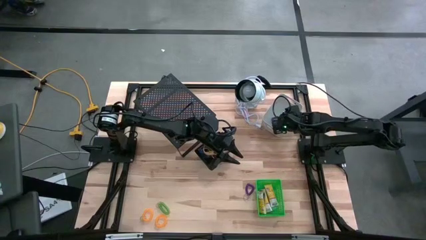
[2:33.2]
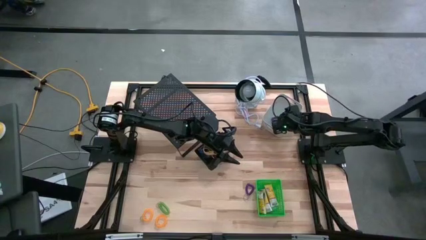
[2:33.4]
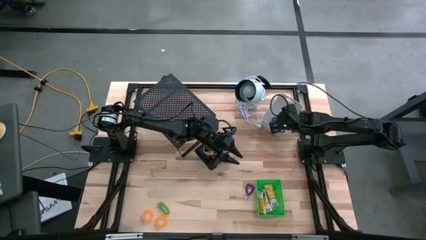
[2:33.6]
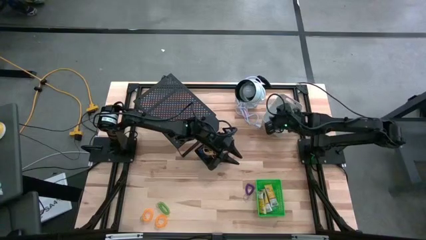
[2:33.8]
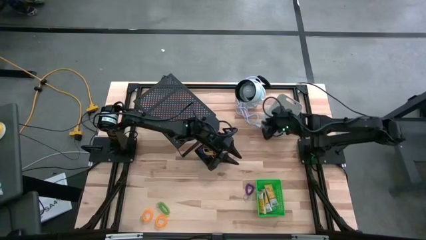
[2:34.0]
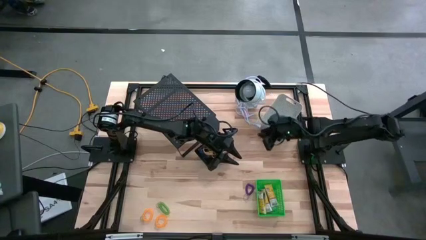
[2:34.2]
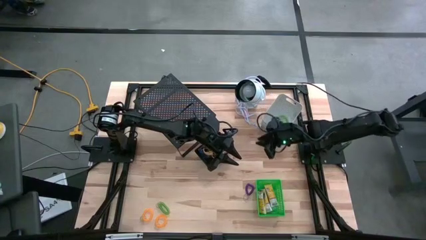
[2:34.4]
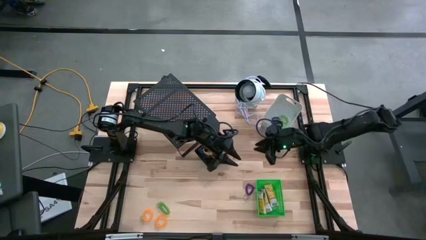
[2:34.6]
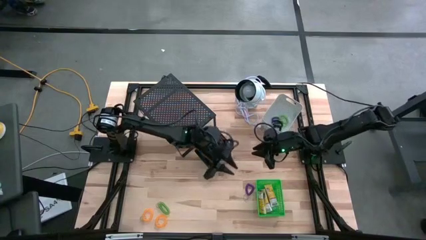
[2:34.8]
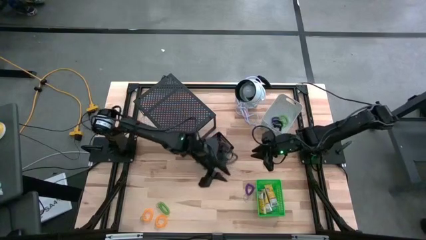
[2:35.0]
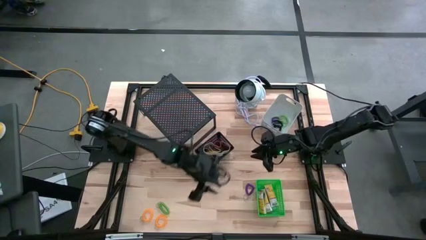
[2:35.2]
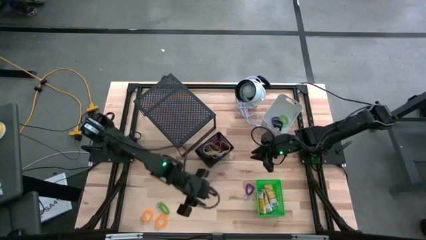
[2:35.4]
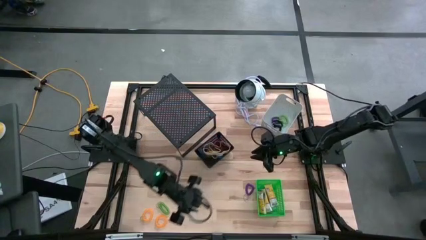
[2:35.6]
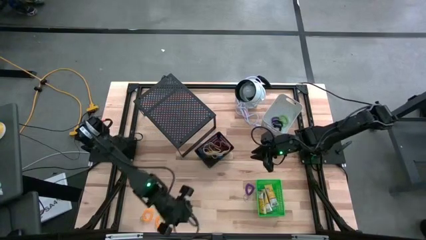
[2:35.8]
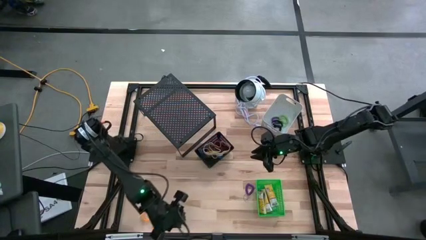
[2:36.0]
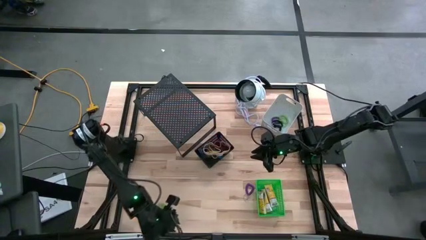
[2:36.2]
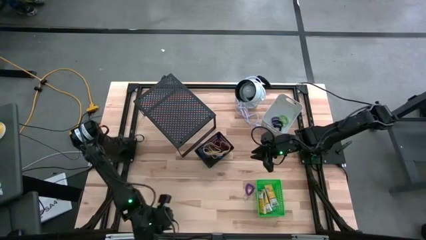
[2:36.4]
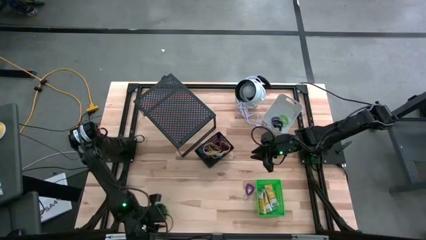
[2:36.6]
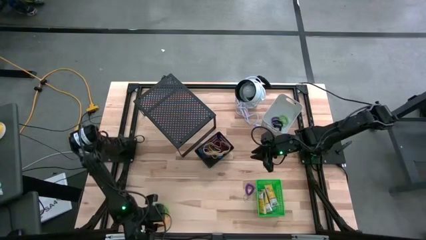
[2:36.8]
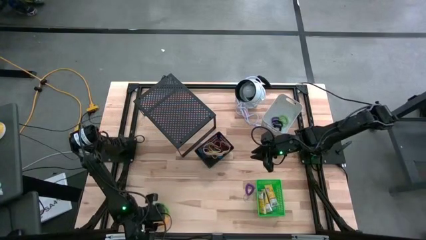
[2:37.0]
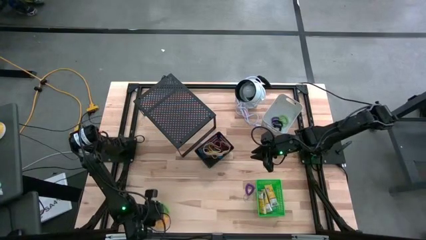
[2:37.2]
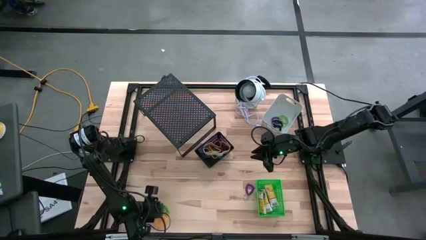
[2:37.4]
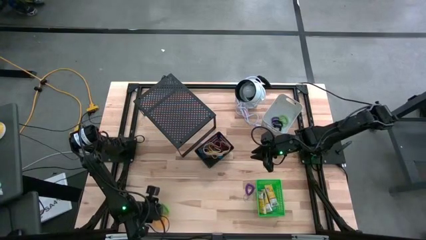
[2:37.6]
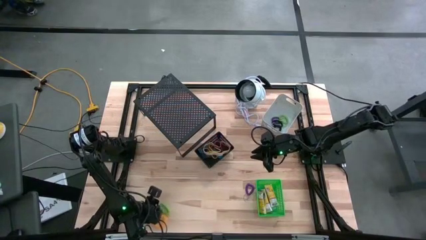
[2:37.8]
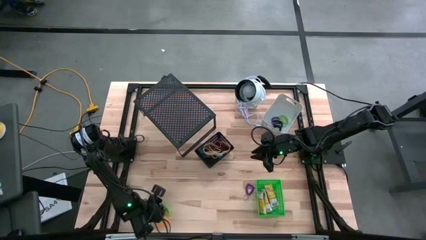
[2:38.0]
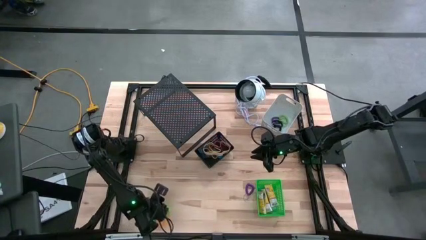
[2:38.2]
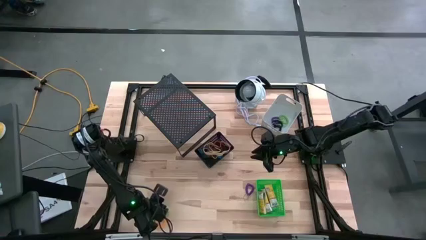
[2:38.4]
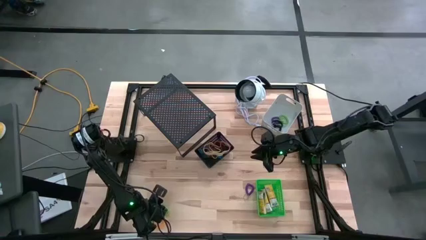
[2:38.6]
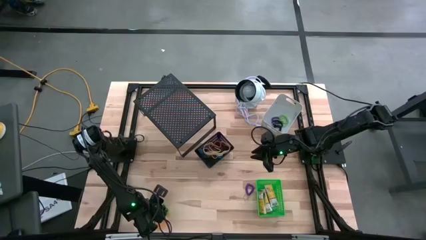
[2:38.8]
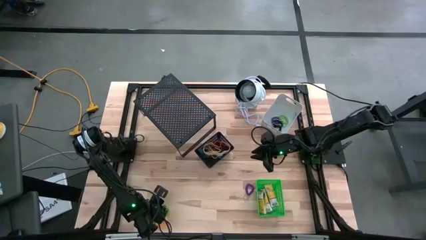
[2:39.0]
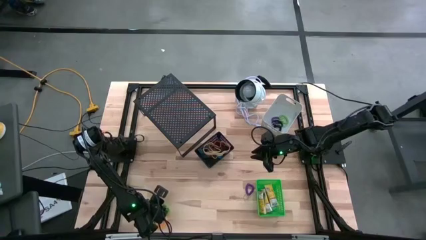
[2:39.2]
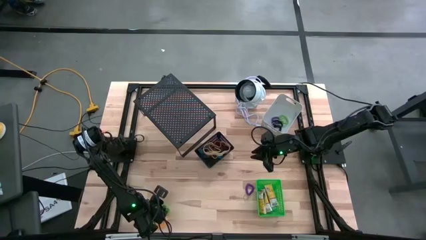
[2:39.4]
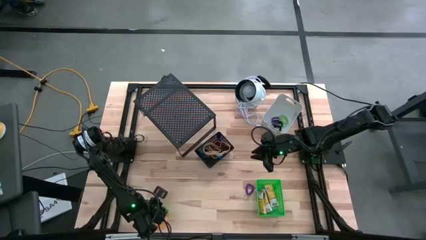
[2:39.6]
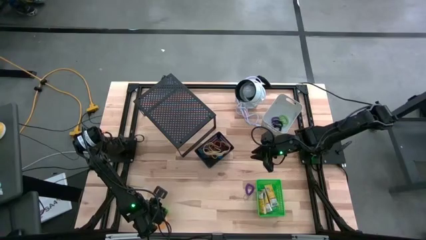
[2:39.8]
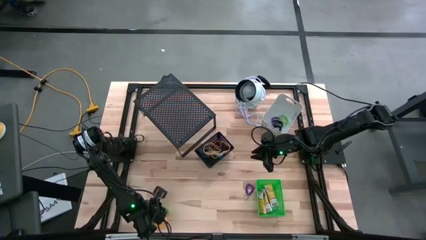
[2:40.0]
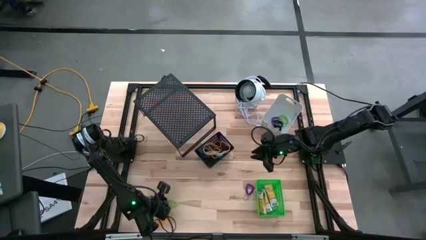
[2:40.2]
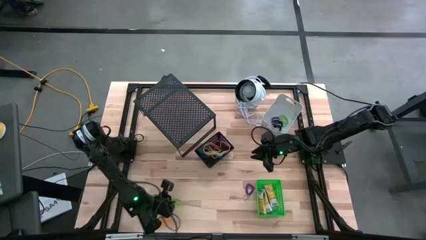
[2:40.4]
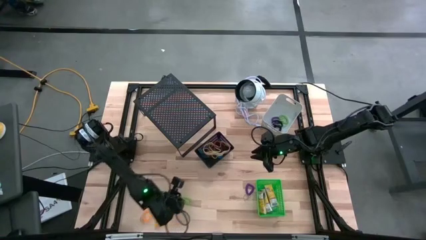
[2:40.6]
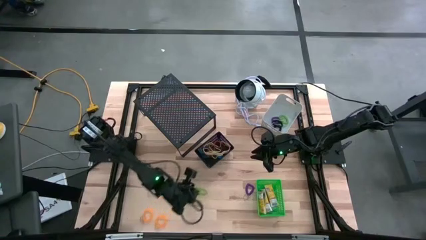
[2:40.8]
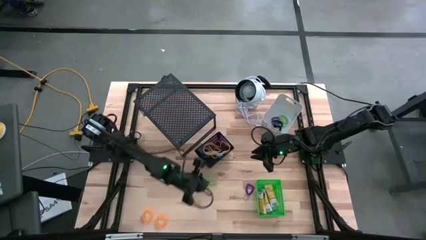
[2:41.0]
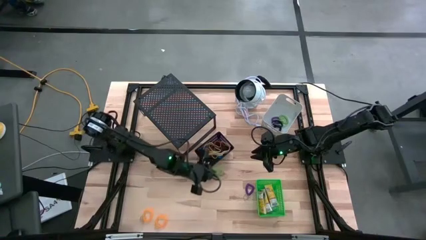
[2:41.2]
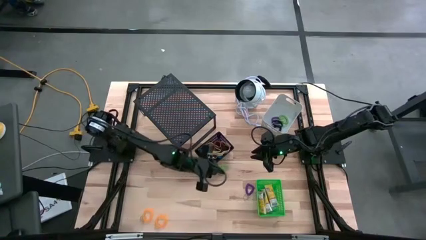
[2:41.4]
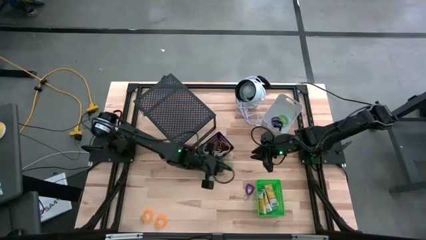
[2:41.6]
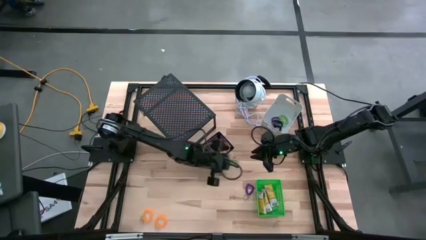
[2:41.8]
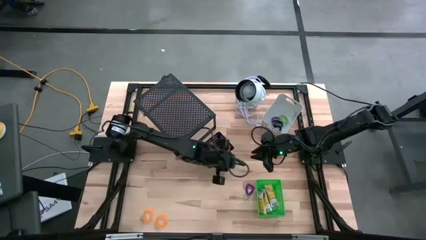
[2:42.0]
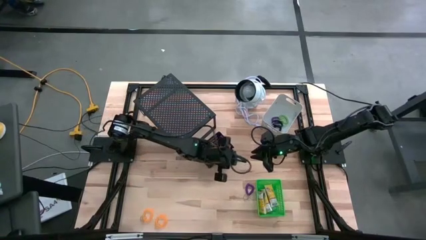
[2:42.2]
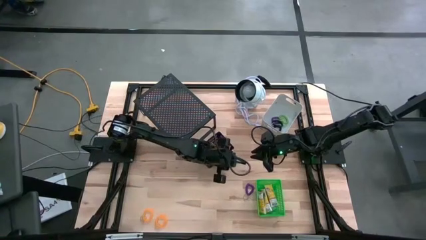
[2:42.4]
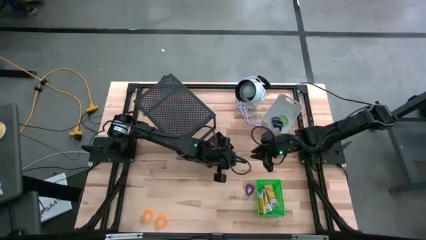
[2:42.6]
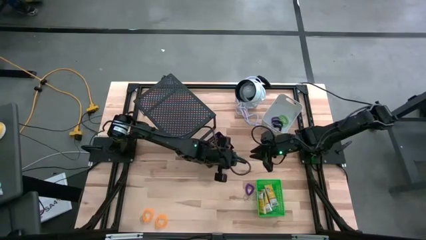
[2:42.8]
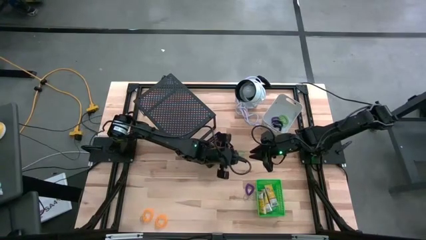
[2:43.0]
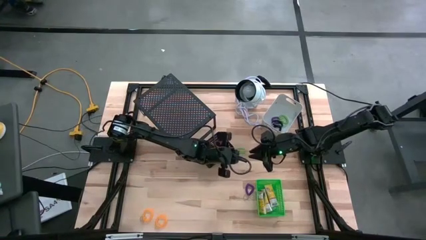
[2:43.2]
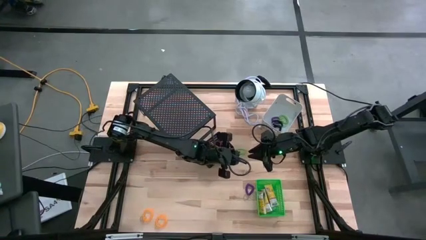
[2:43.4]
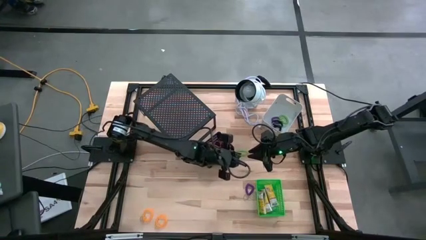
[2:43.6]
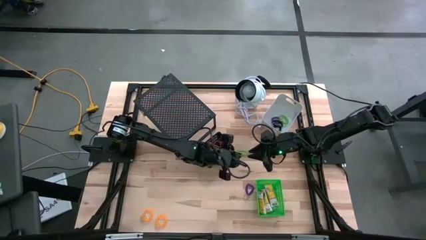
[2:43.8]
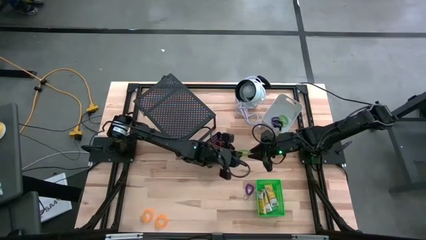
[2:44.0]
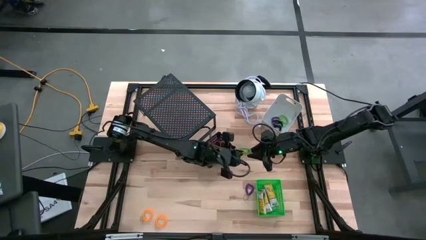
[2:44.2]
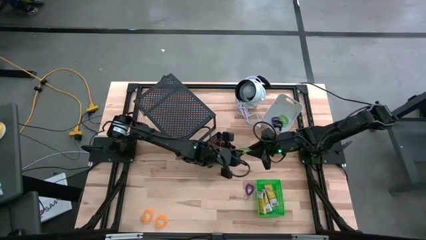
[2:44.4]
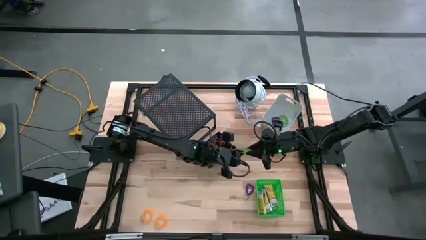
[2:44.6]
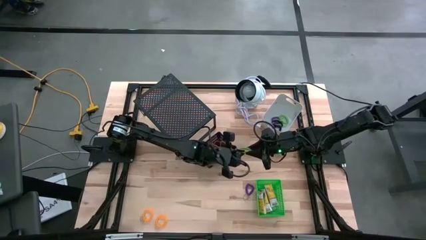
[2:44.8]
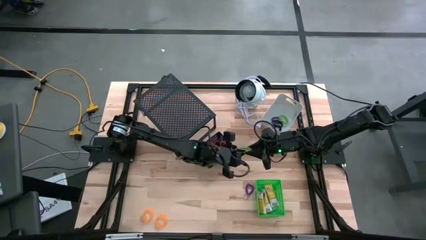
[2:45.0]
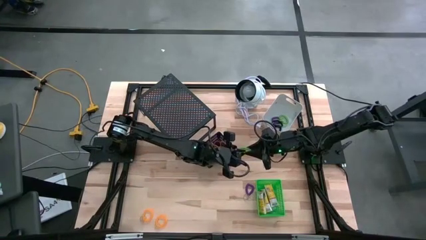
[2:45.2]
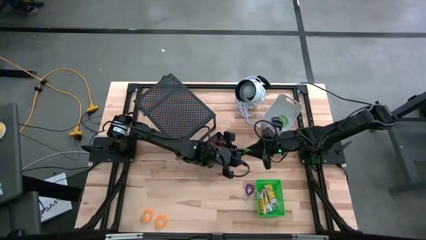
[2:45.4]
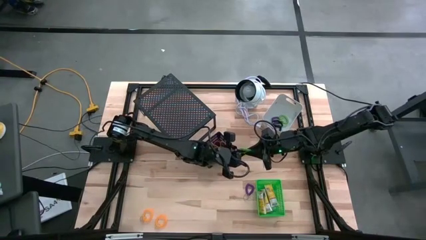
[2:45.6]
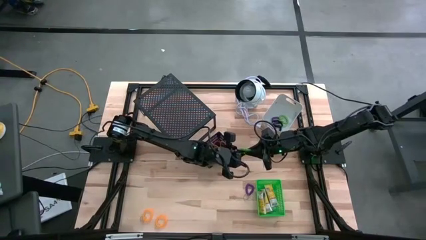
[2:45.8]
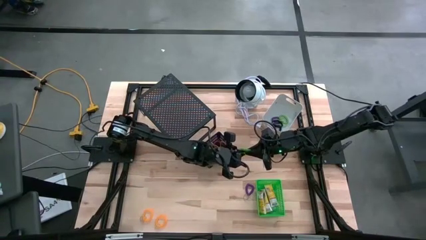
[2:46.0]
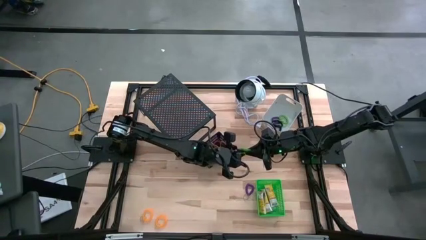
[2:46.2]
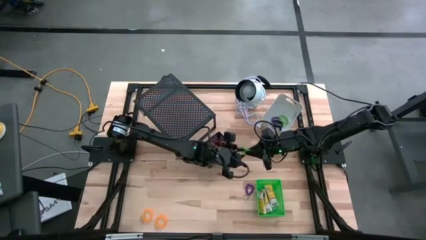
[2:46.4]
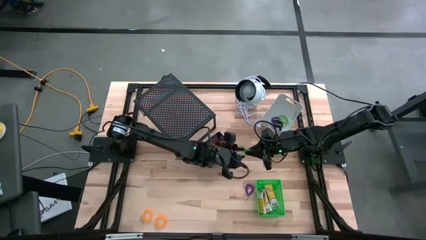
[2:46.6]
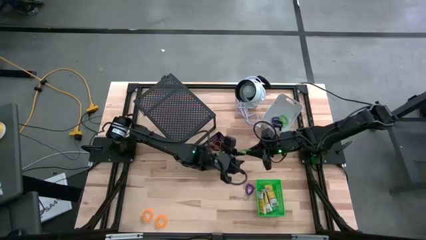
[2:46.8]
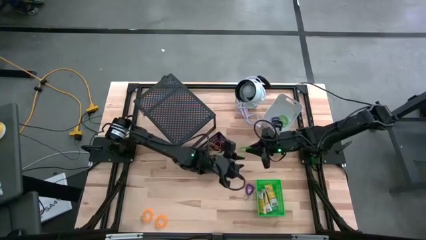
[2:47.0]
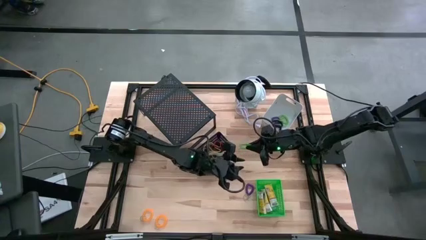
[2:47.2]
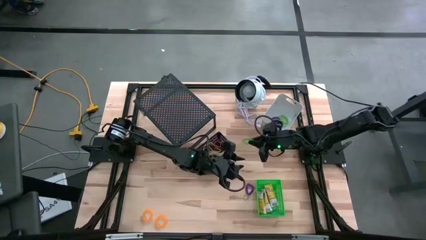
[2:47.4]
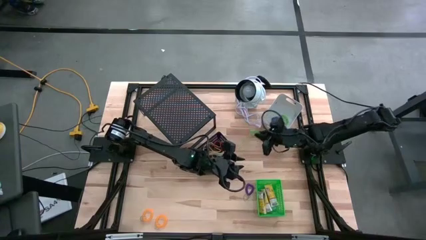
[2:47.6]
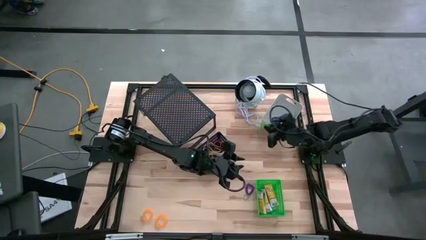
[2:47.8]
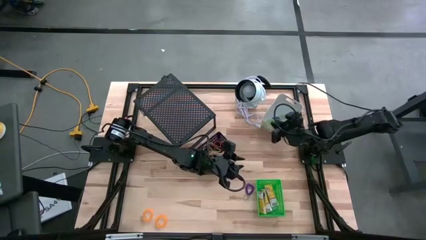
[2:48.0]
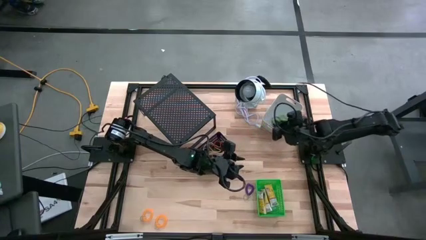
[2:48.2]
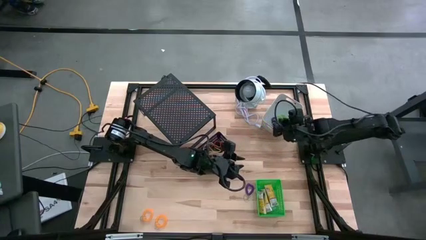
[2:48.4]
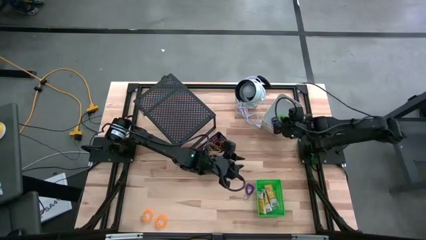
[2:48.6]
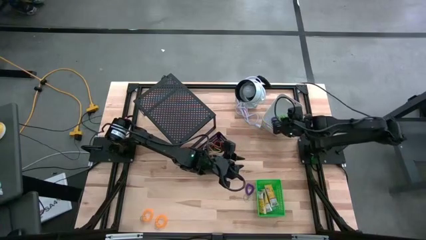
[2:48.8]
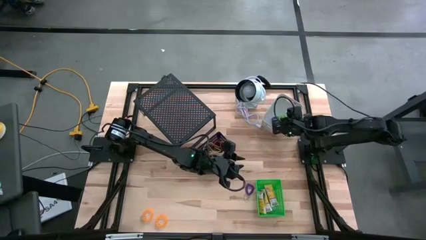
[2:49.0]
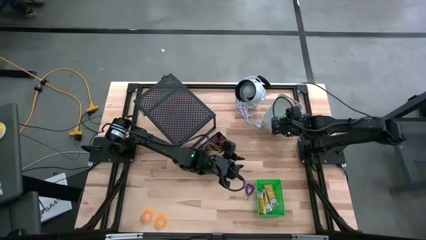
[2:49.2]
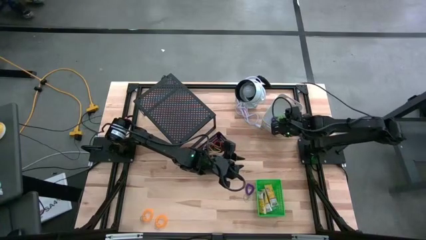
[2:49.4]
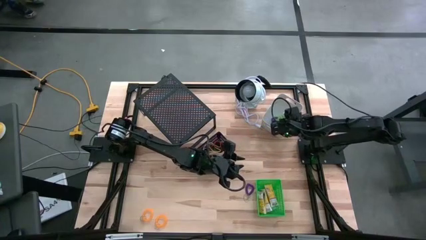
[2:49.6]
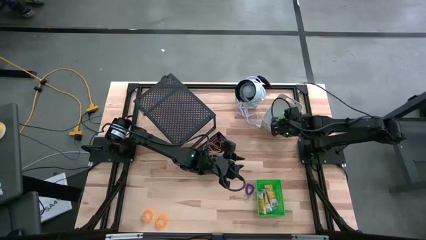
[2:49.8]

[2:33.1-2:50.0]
Task: Pick & Place Office Desk Supplies
Put the green spring keychain into the white bin
